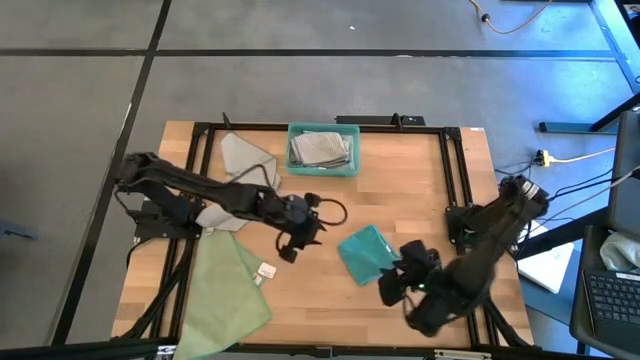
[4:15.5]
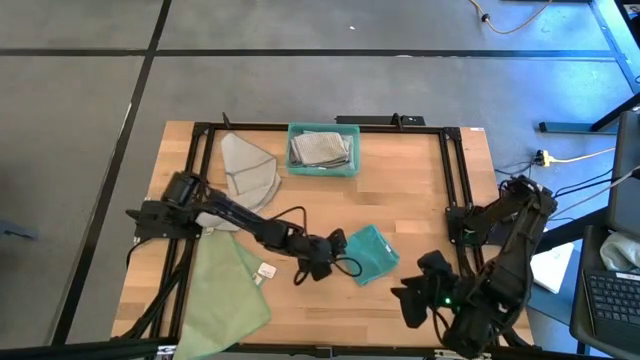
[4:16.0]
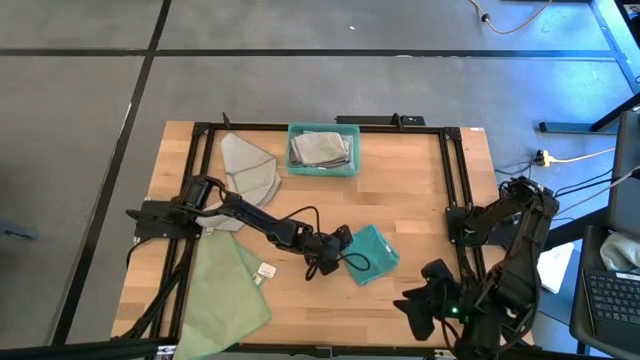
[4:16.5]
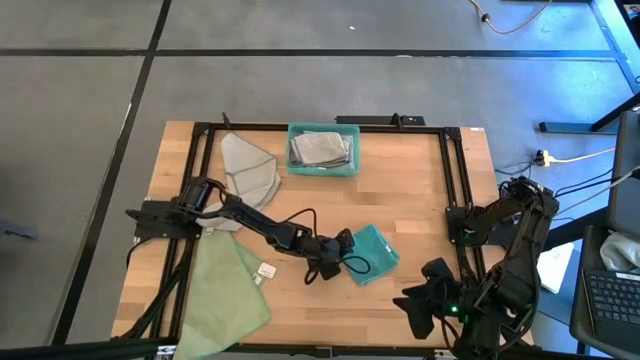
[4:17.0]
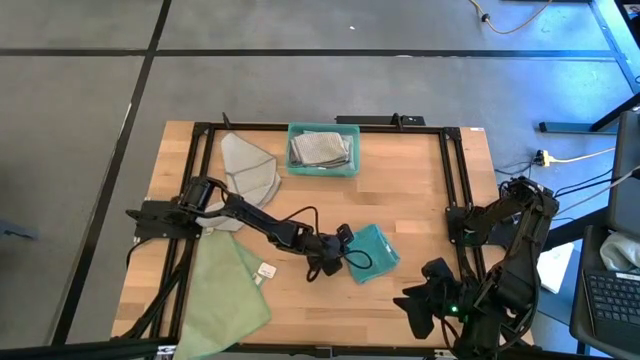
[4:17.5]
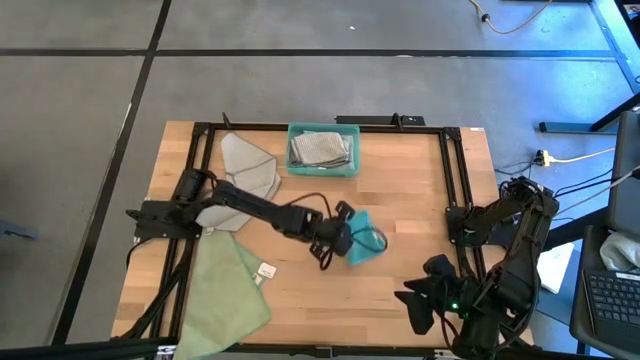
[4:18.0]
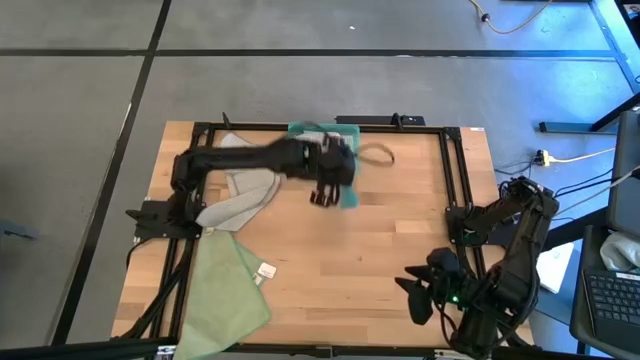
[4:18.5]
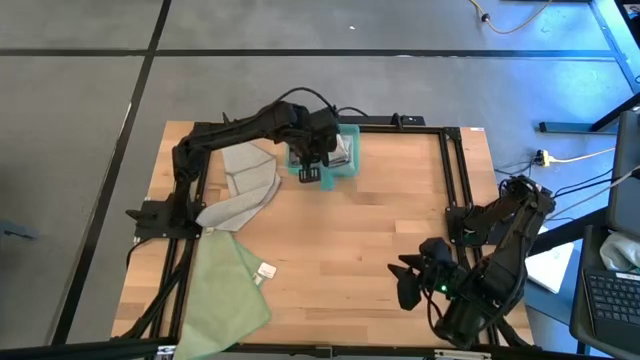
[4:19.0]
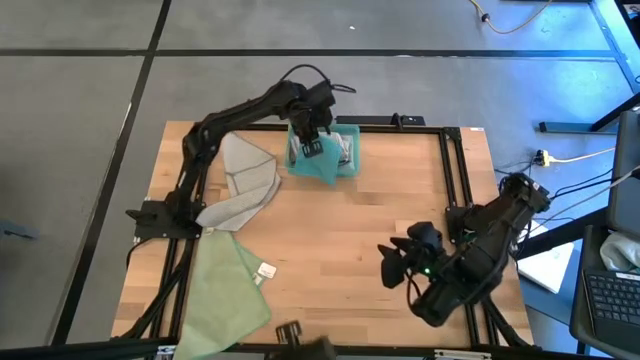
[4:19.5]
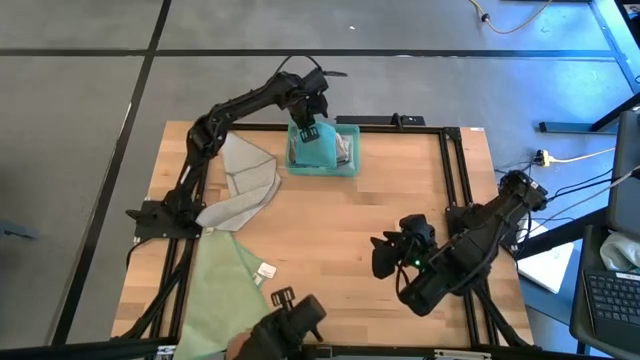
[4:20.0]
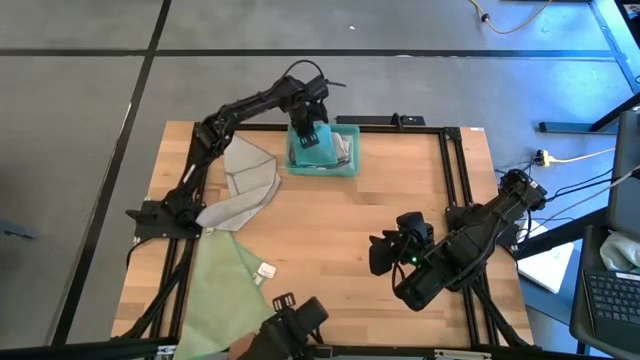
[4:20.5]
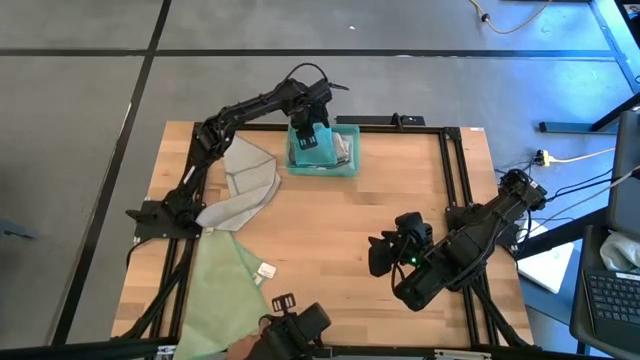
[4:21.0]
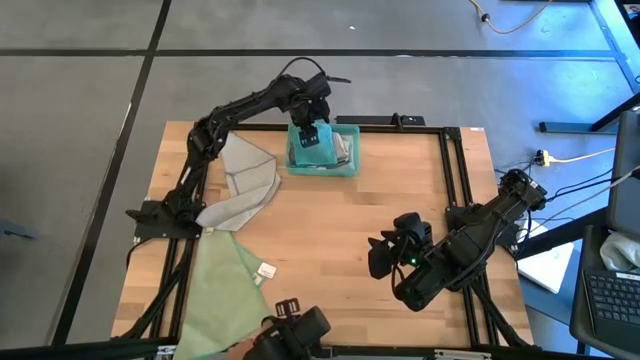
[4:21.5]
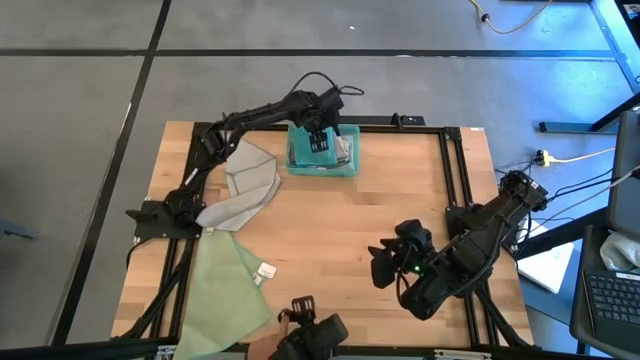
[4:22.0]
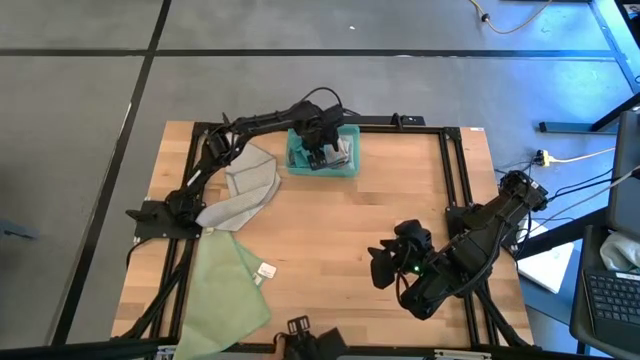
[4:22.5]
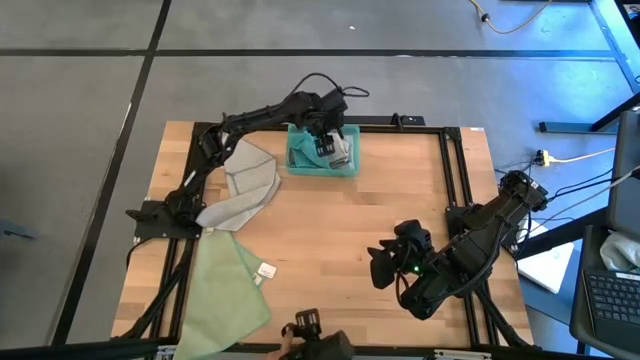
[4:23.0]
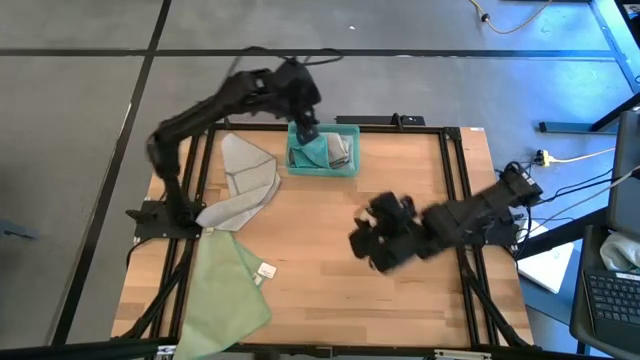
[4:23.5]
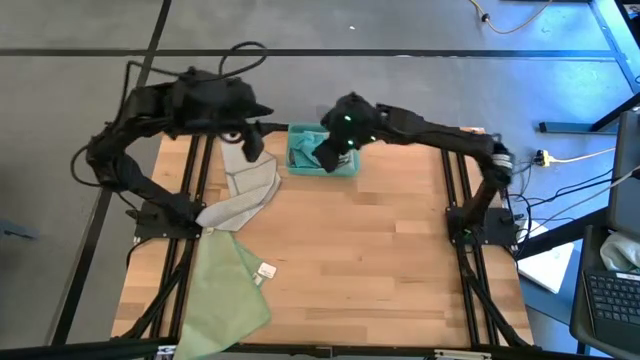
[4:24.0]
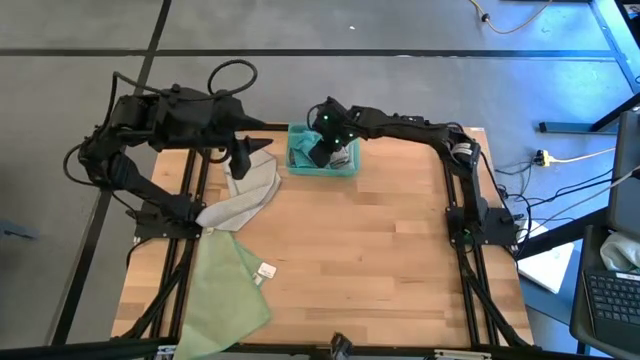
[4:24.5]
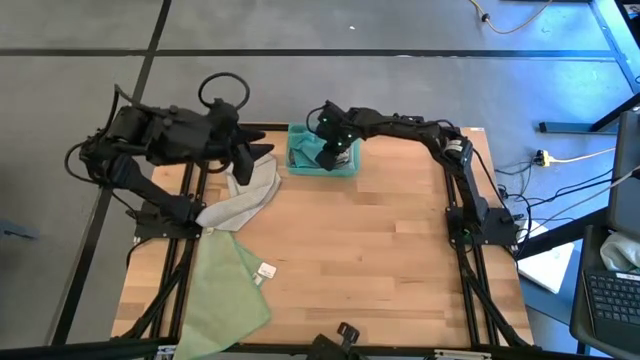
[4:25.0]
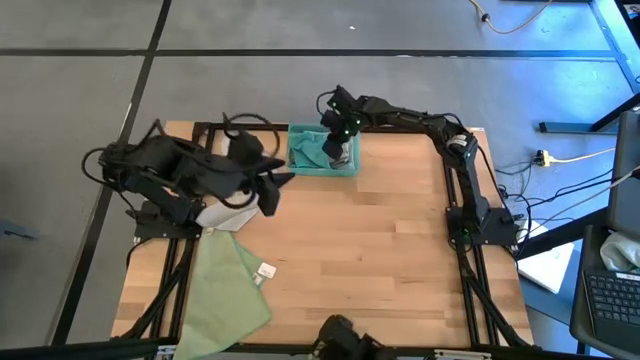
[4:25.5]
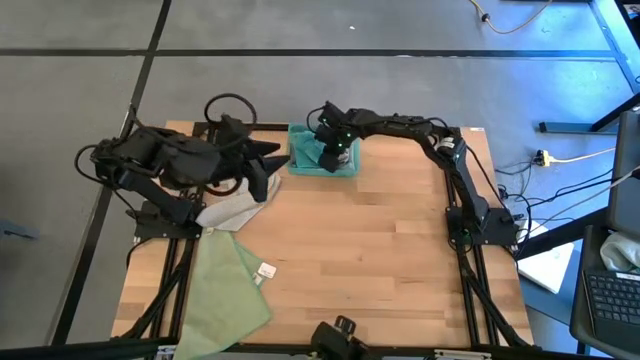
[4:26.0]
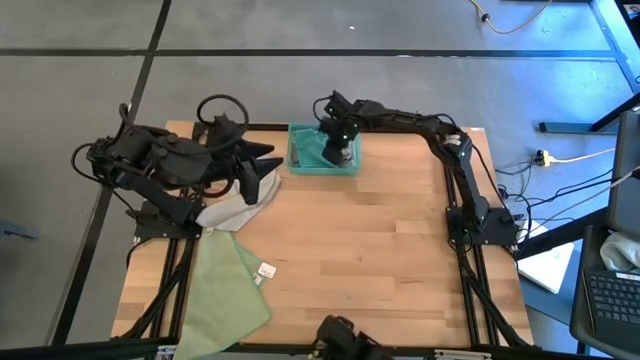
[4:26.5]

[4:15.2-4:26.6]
Task: Fold microfiber towels
Put the folded blue towel into the bin

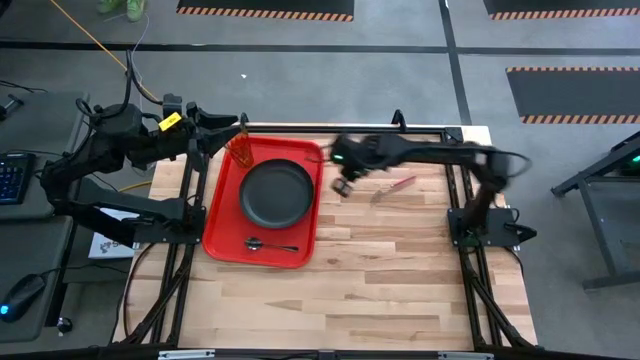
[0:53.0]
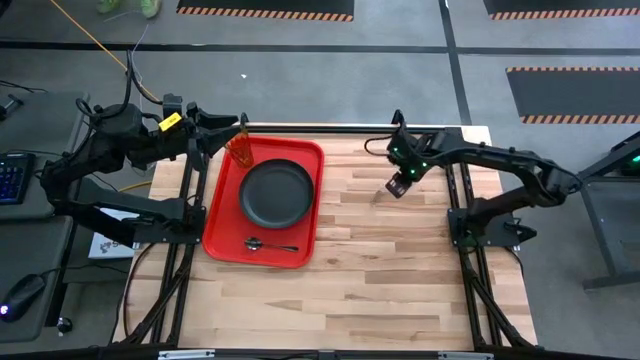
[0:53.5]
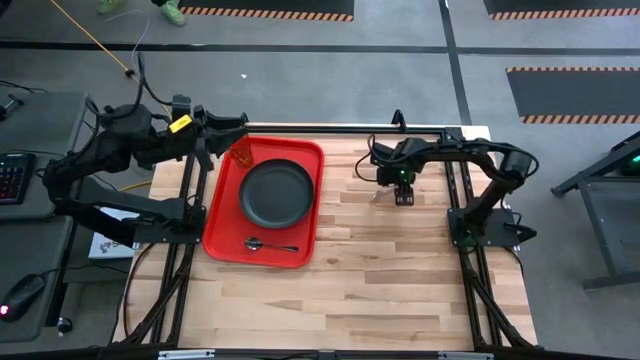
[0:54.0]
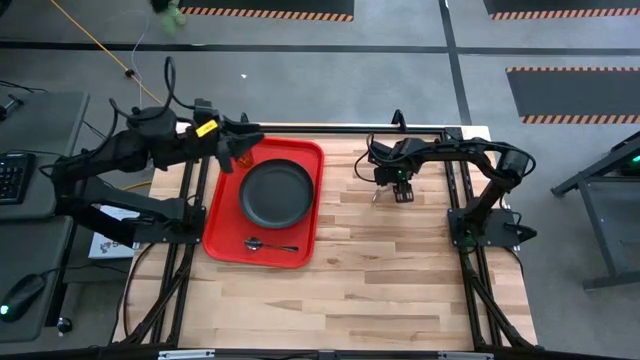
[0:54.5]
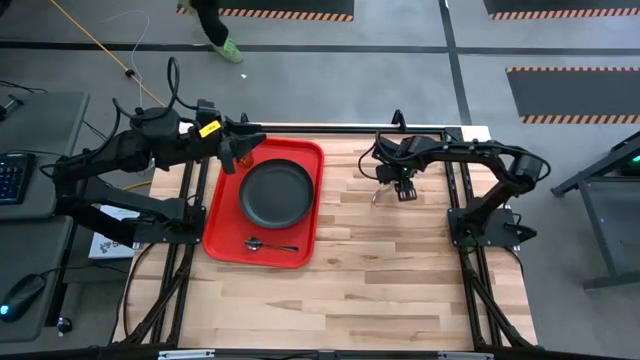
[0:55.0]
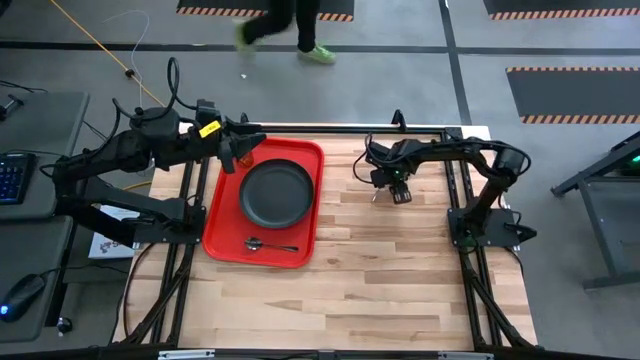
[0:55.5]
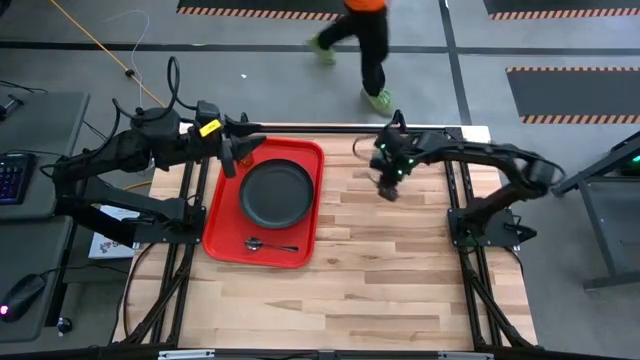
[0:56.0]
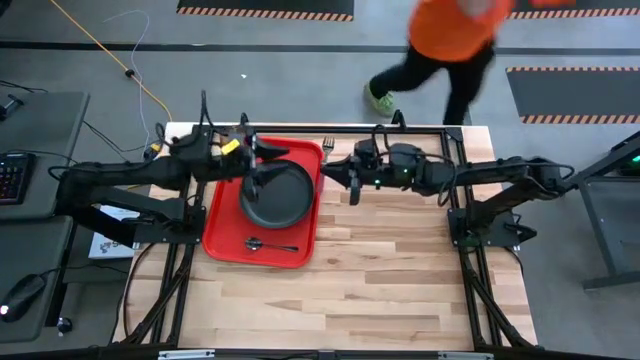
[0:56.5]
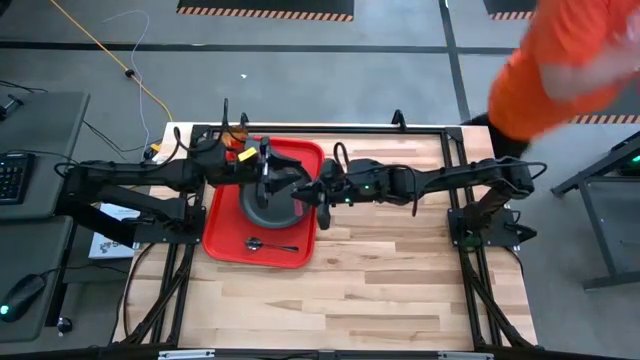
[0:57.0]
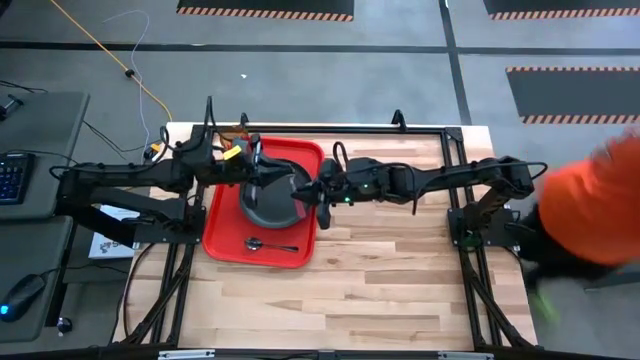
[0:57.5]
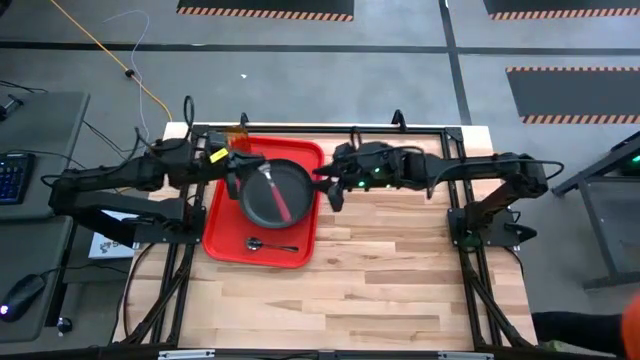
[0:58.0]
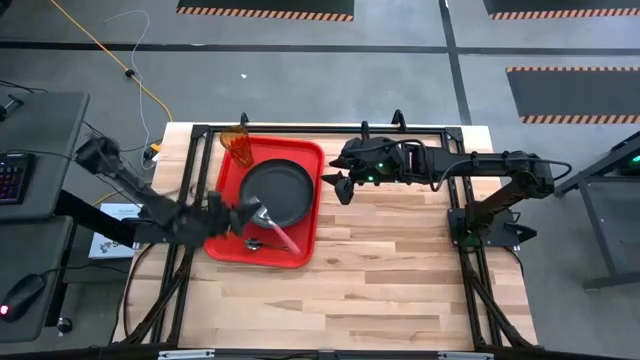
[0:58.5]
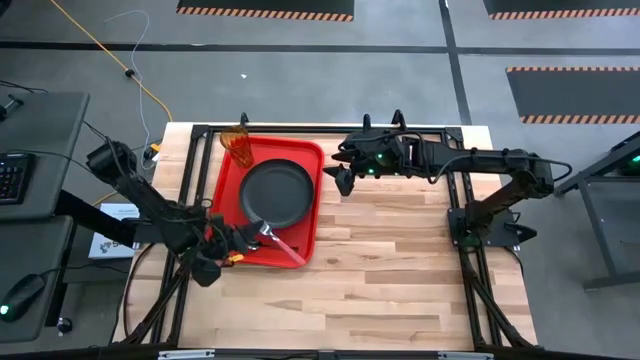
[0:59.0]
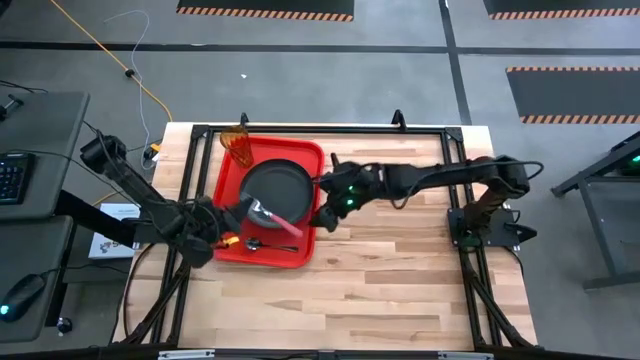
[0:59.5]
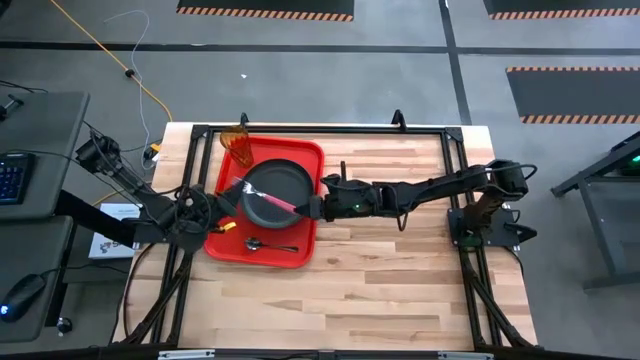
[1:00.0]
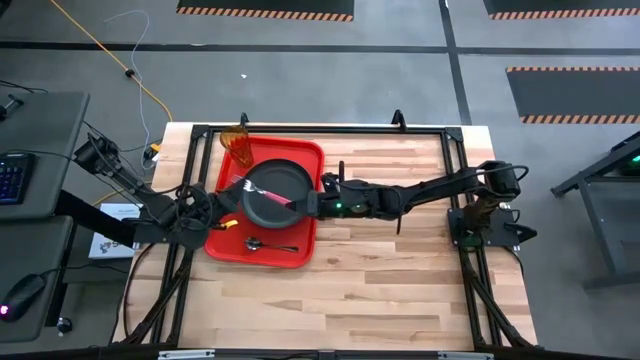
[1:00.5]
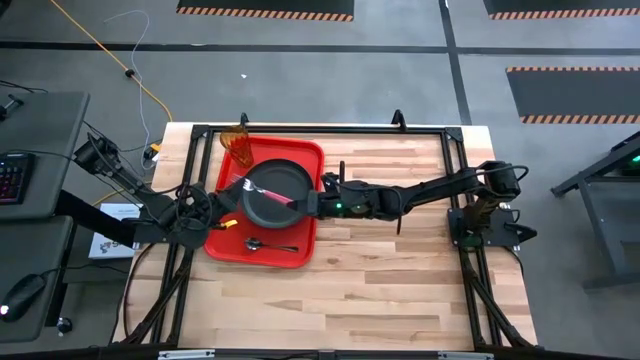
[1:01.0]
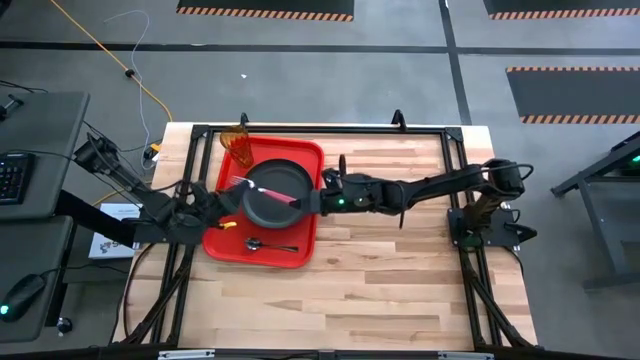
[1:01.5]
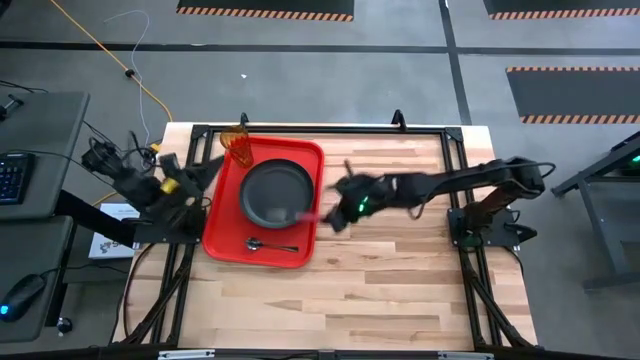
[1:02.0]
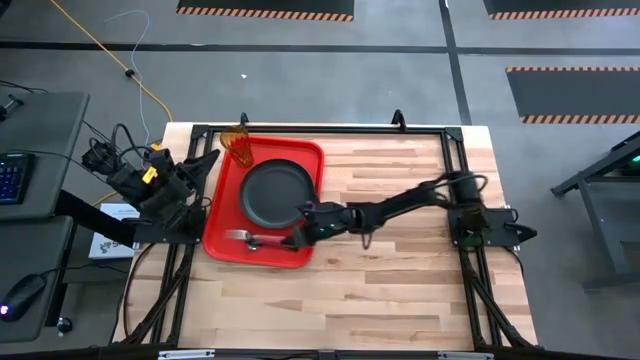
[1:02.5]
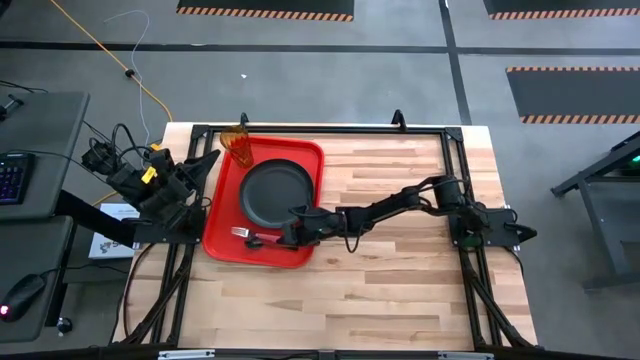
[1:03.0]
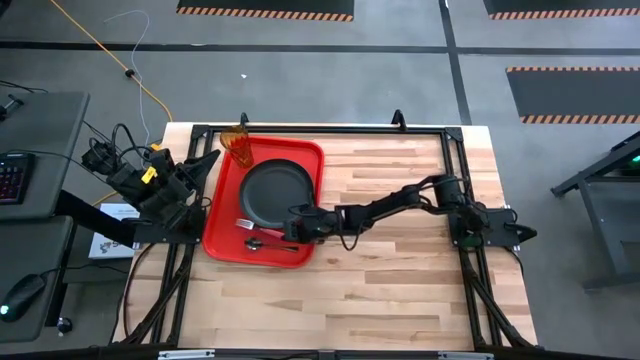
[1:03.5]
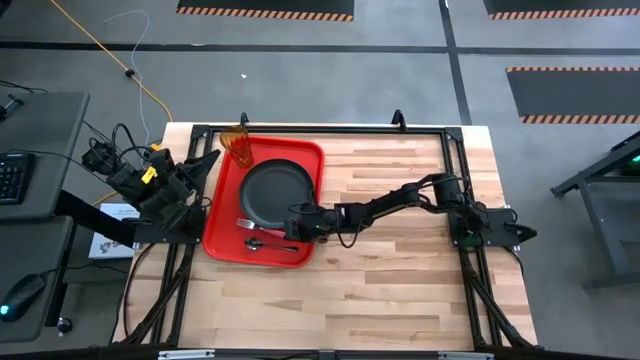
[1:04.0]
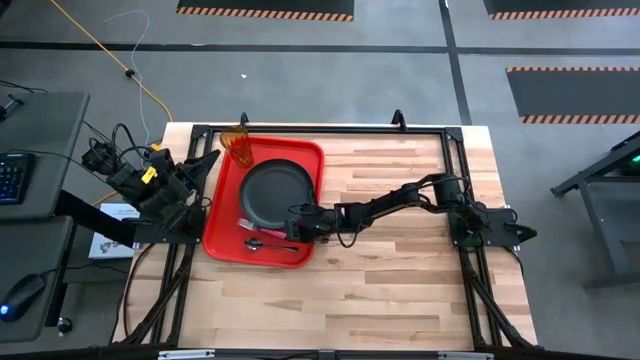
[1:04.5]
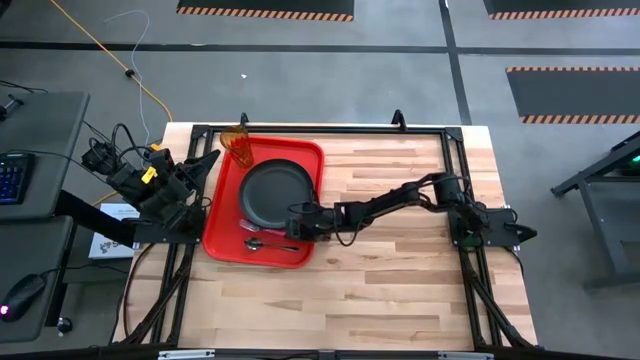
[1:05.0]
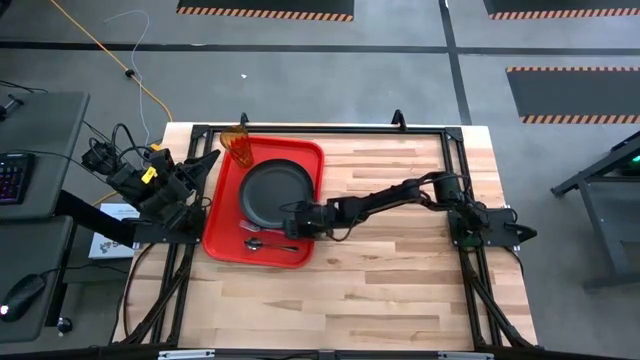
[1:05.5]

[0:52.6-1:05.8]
Task: Pick and place plate/cup/fork/spoon on tray
Put the pink fork on the red tray to the right of the black spoon
